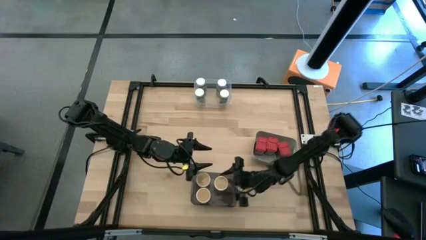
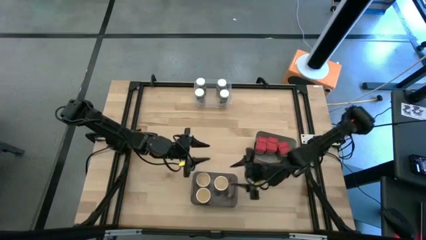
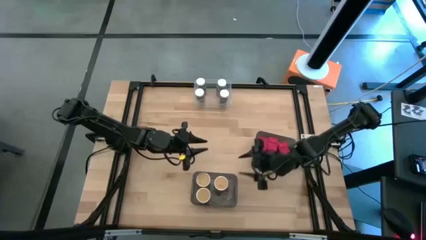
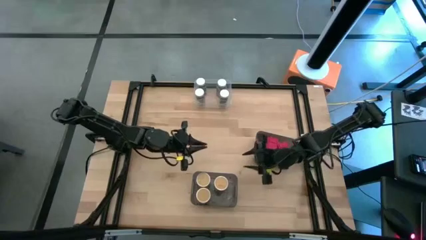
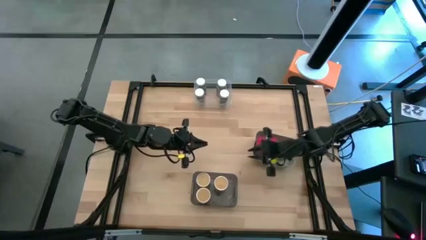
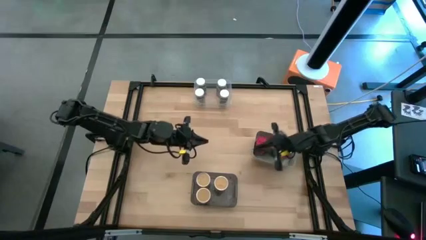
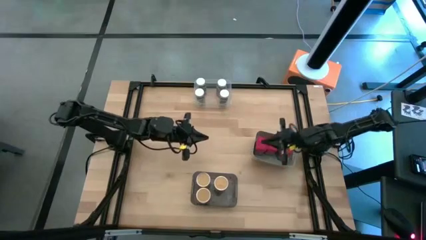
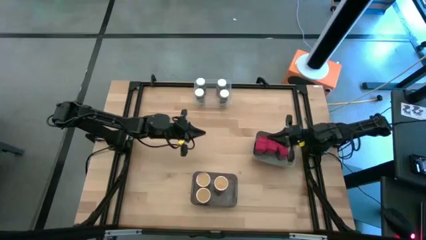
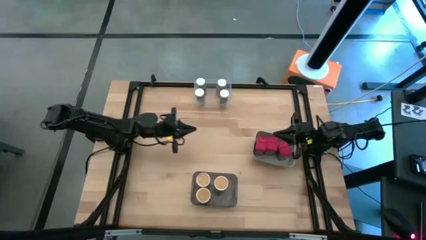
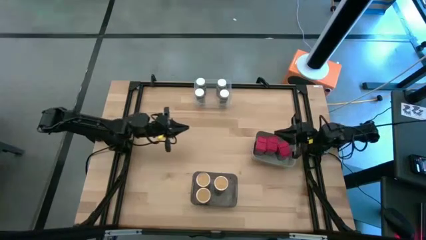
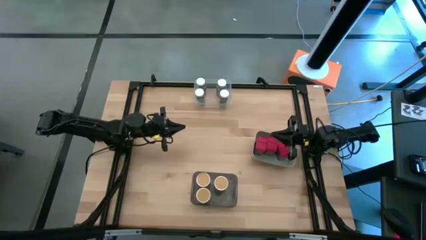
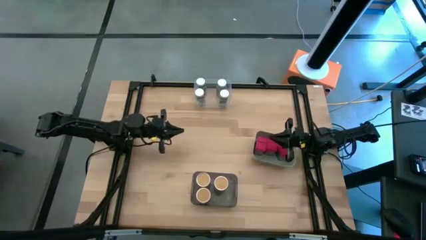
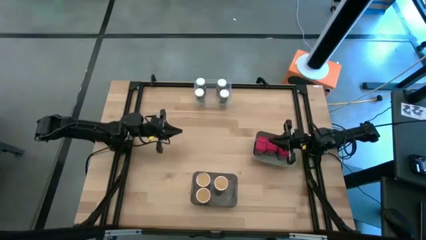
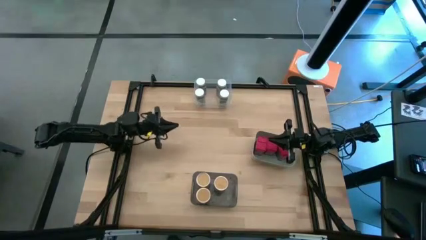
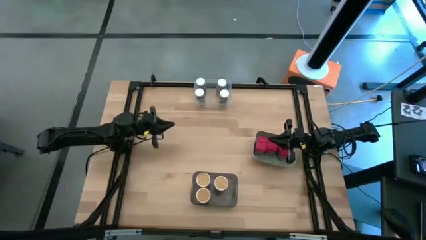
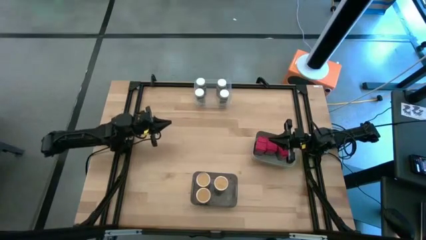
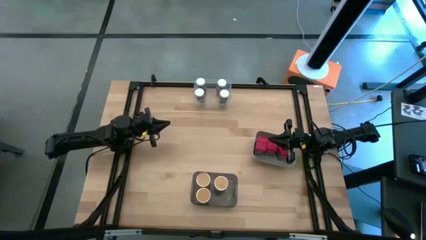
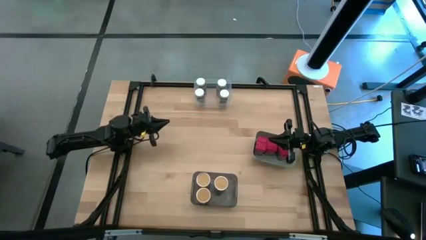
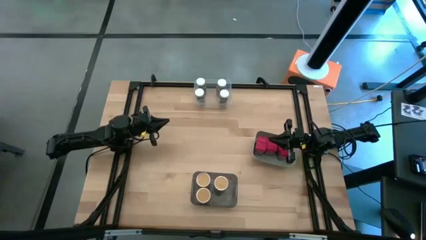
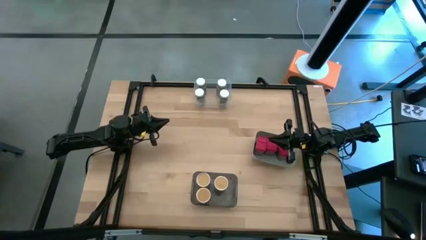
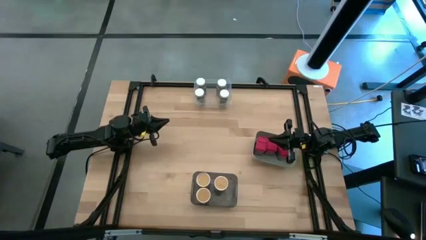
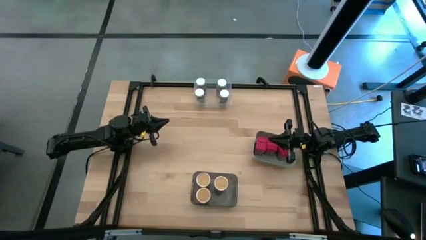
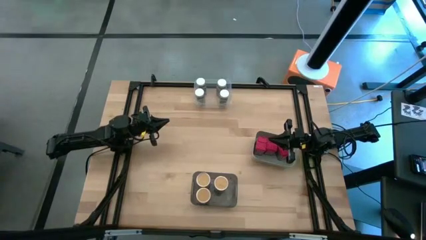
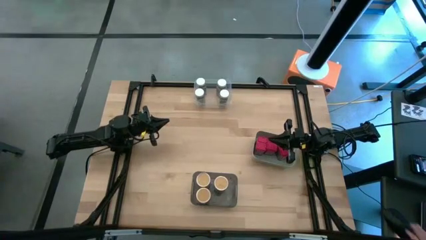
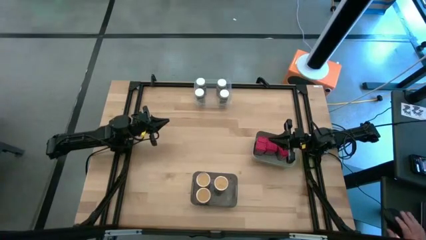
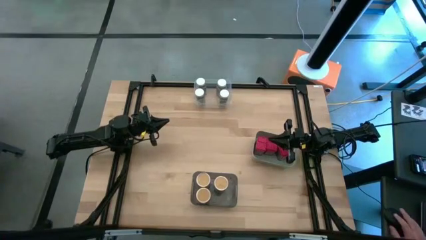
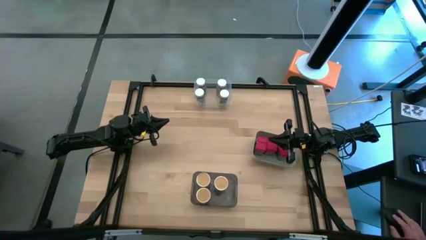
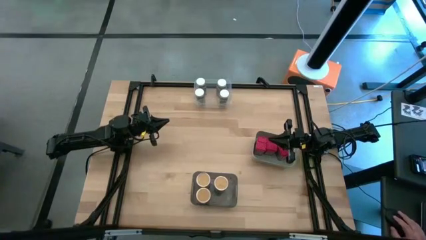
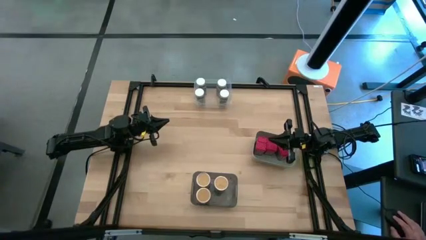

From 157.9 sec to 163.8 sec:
Task: Sort spices by type
Return to Home Position

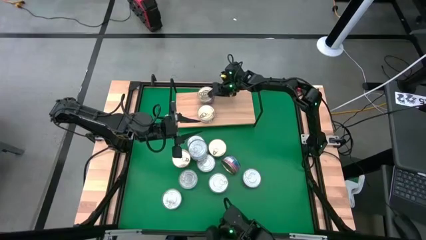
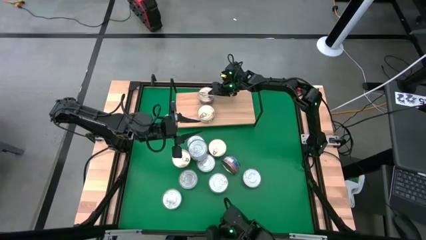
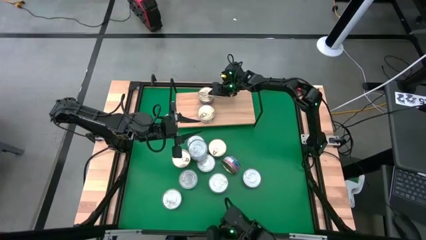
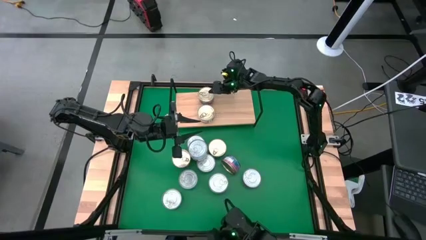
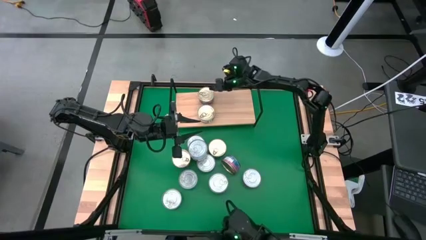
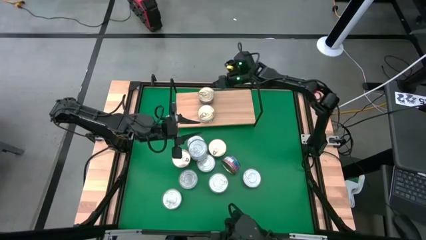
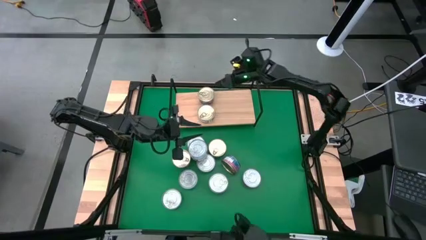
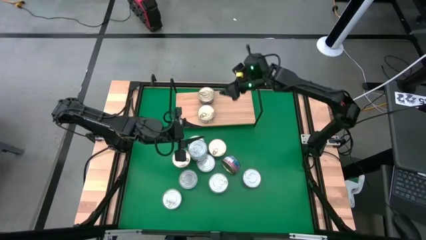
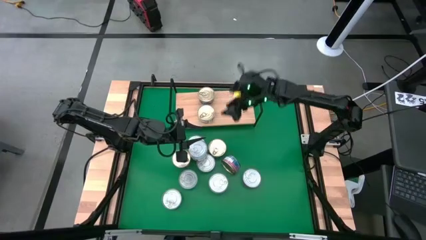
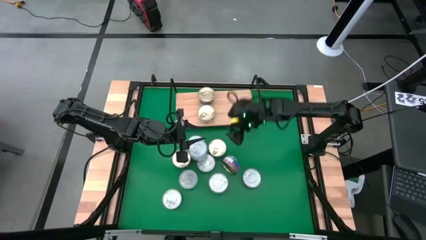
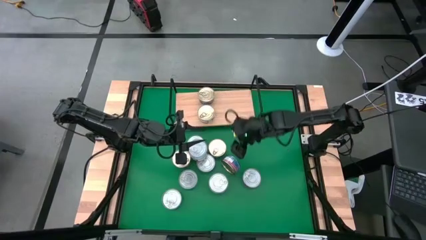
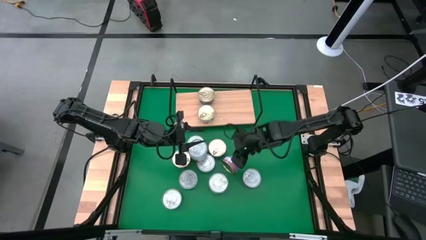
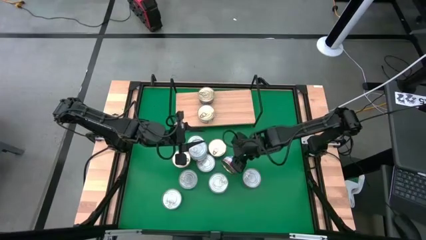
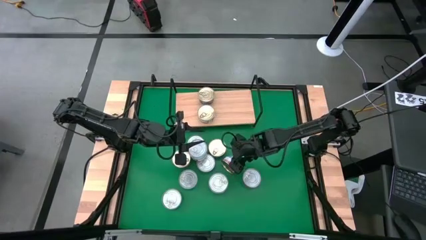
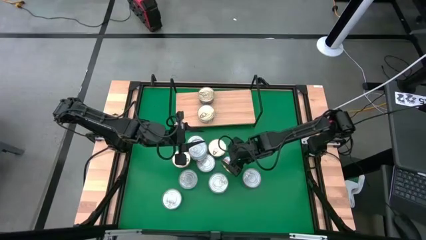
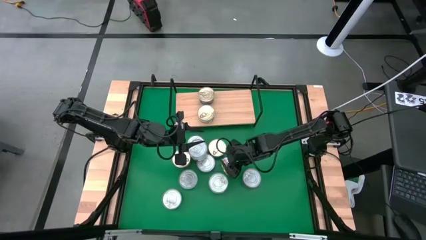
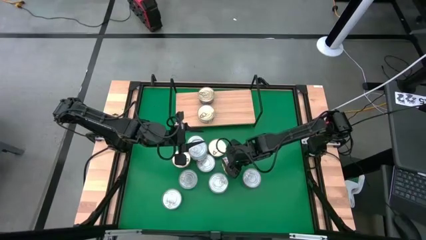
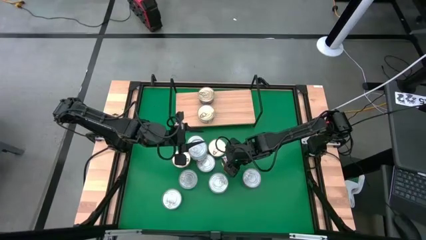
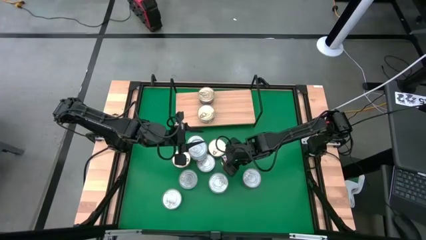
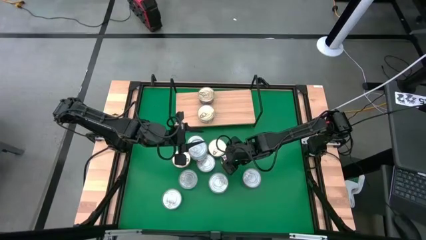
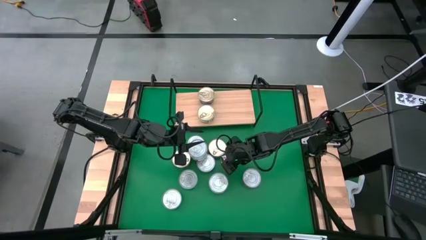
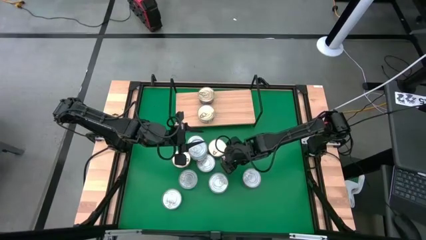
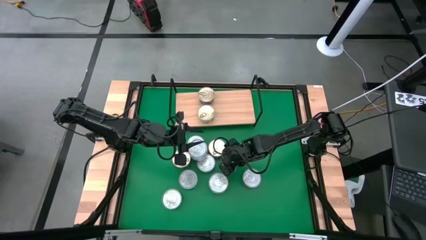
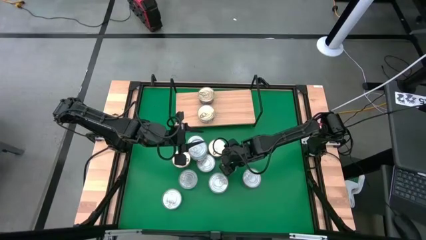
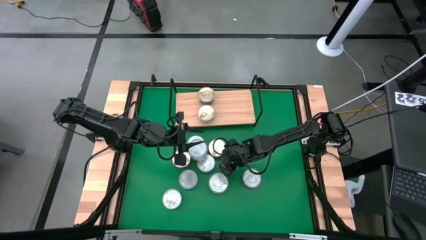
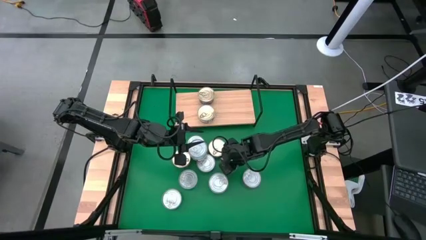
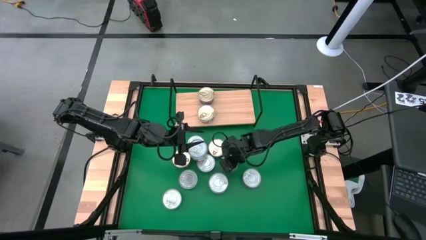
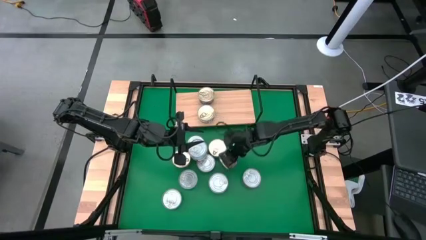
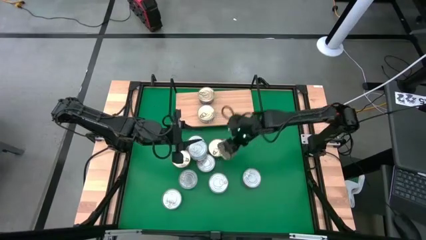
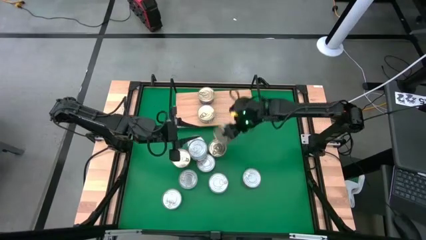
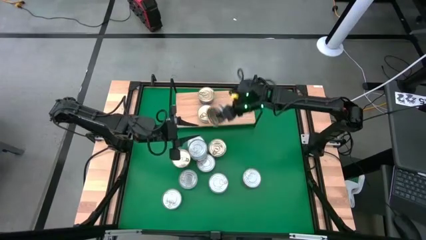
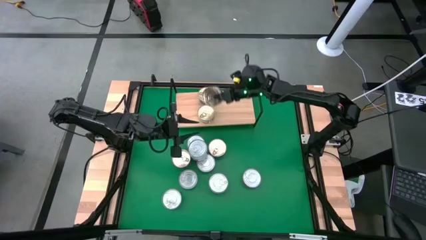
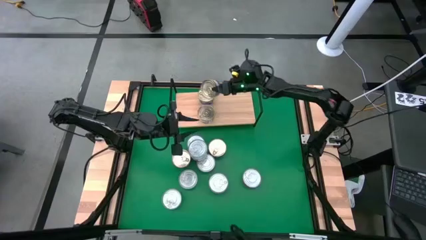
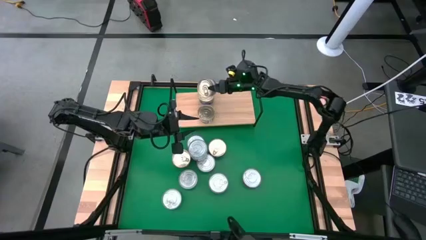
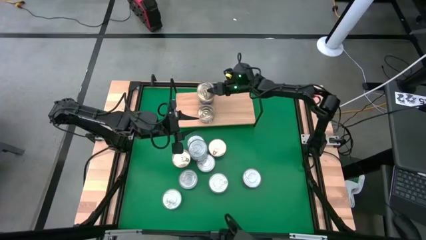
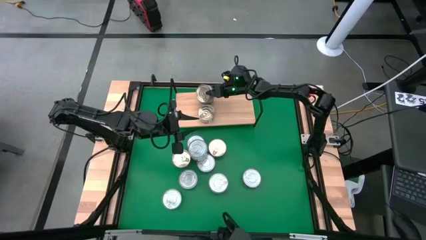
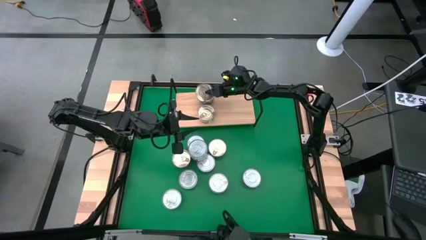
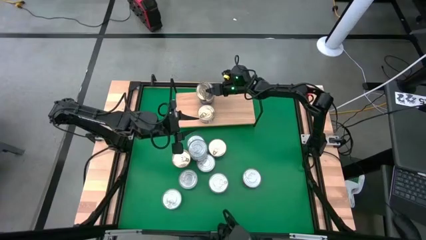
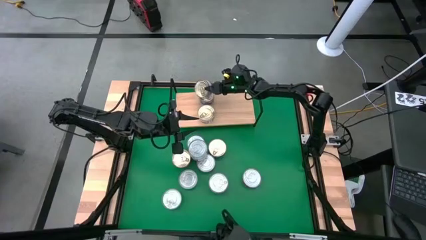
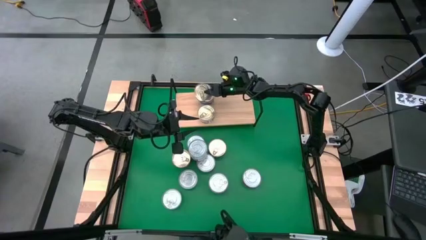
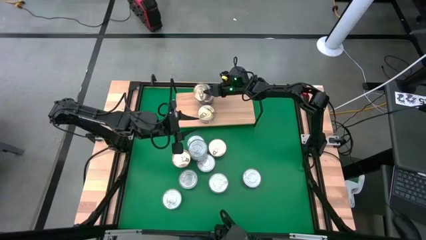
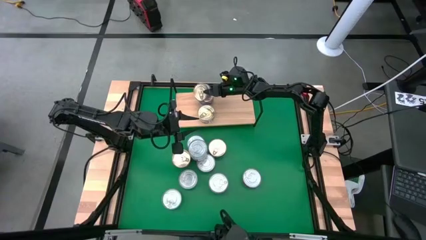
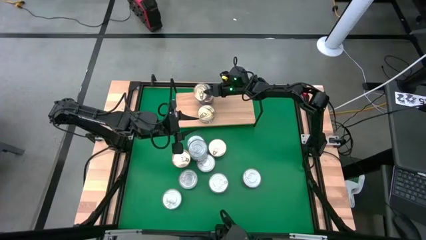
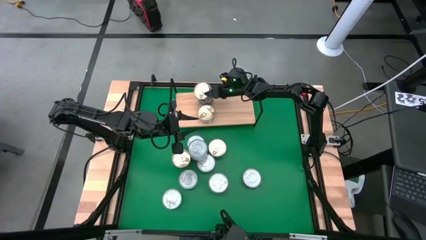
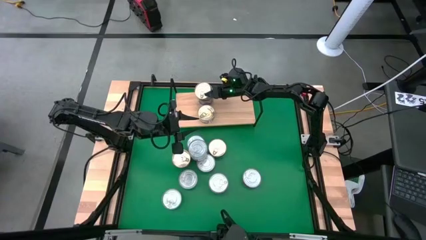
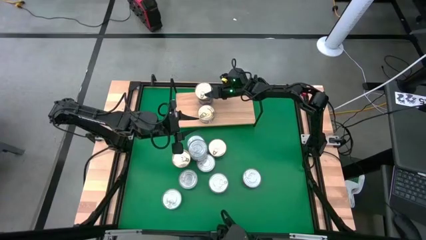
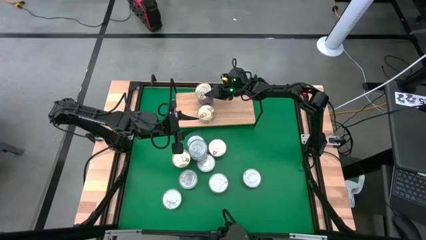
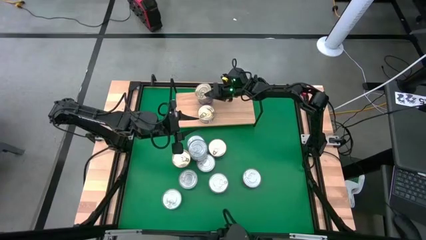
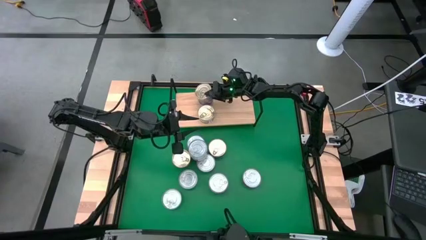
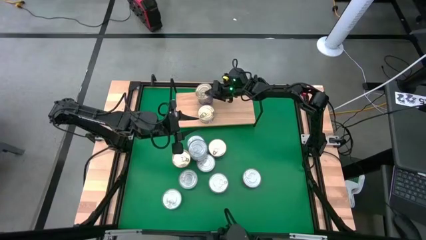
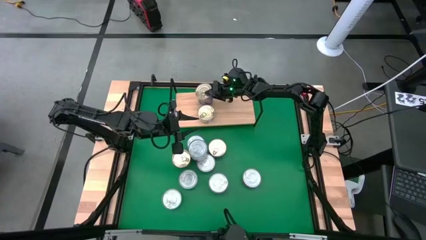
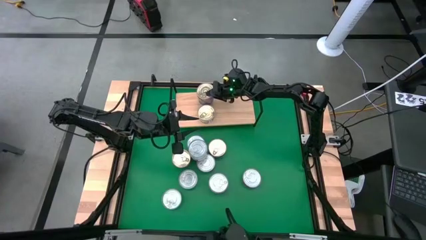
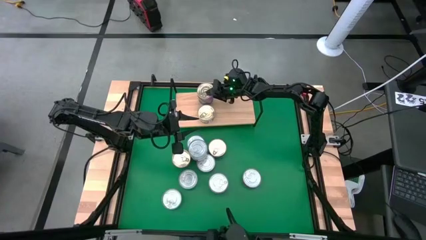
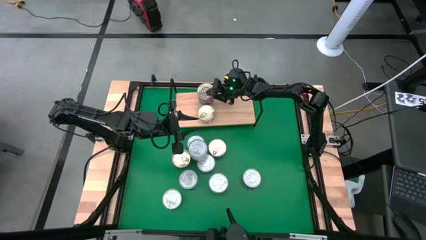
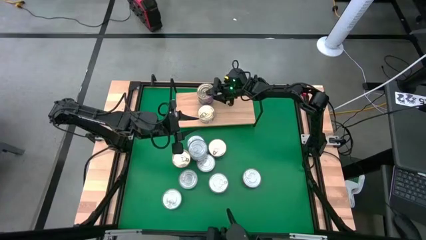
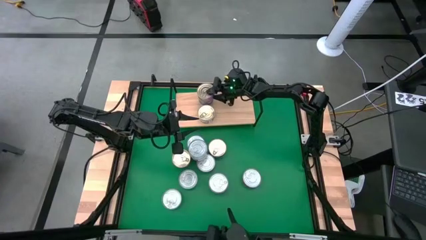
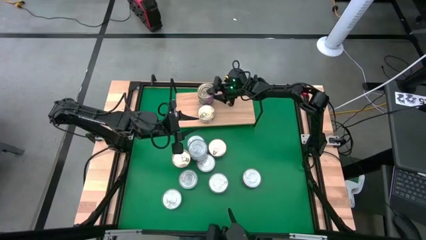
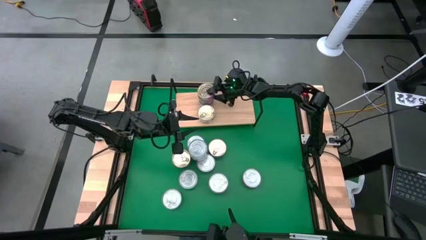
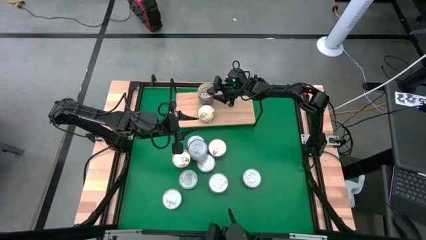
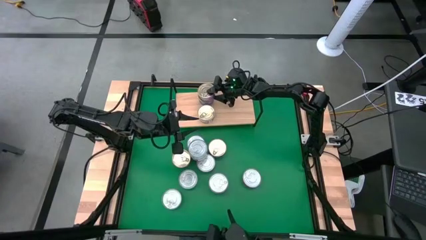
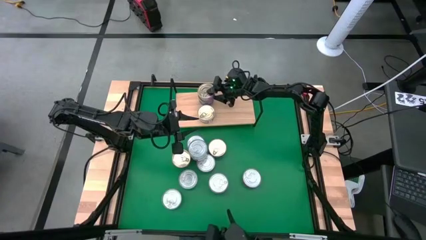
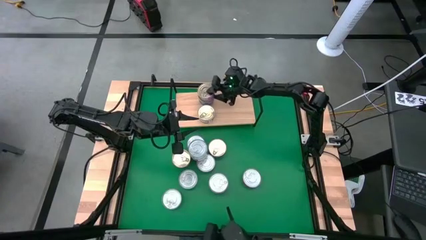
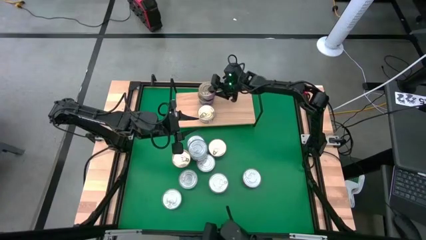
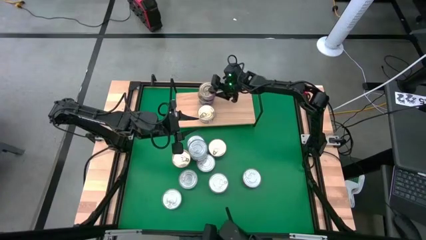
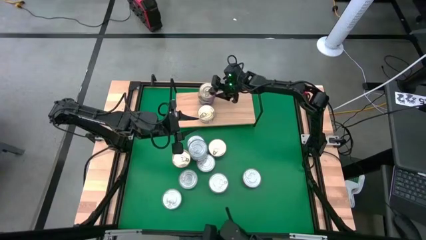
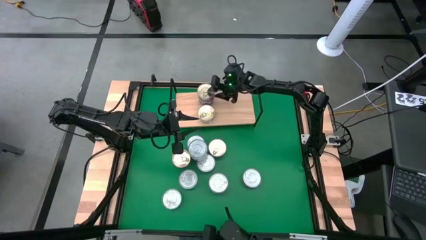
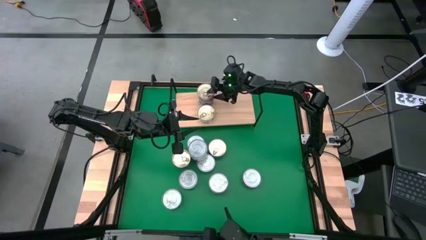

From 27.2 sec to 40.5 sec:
Task: Stack canned seafood by type on shelf
Stack the blue-pink tuna can on top of the blue-pink tuna can on the shelf
